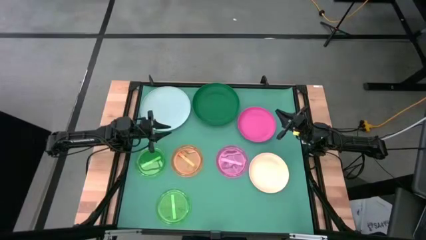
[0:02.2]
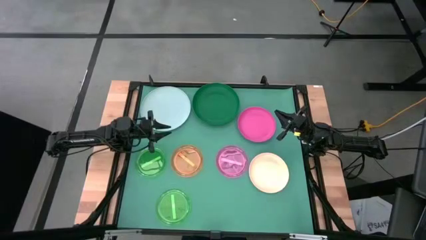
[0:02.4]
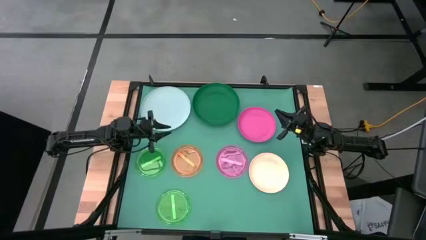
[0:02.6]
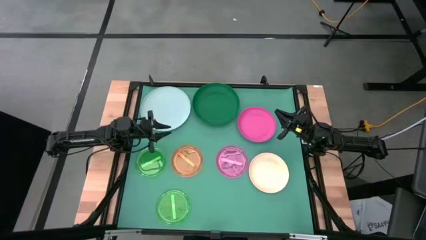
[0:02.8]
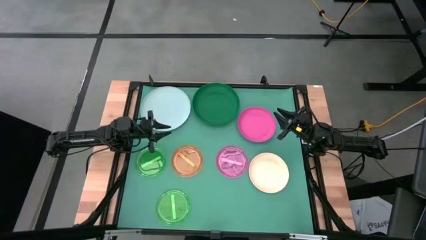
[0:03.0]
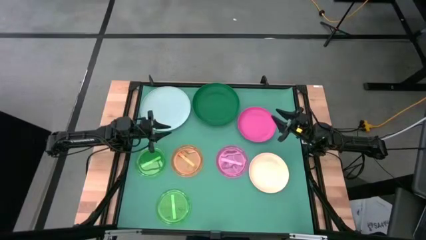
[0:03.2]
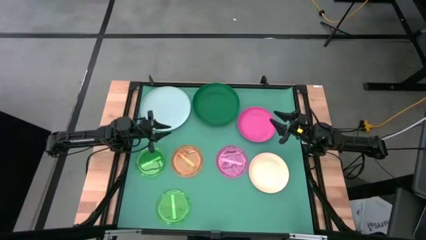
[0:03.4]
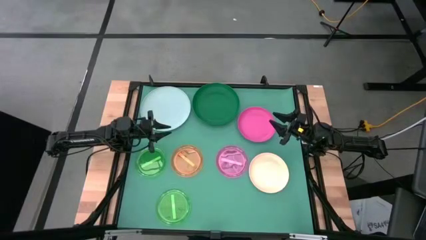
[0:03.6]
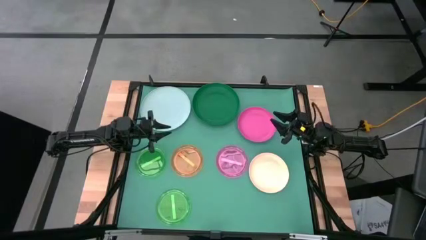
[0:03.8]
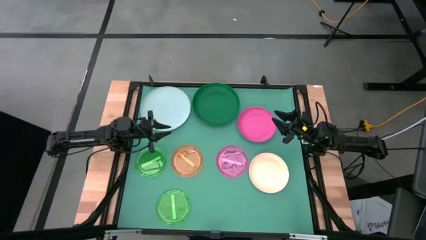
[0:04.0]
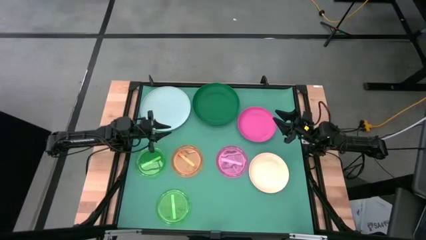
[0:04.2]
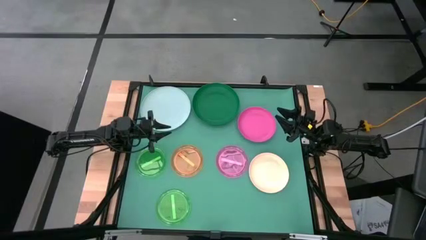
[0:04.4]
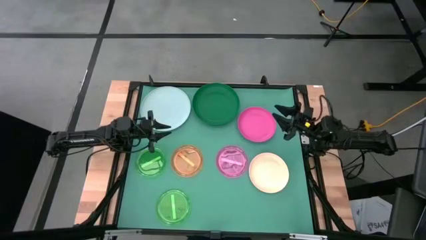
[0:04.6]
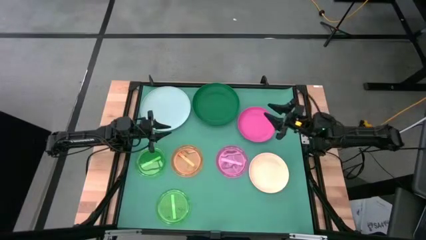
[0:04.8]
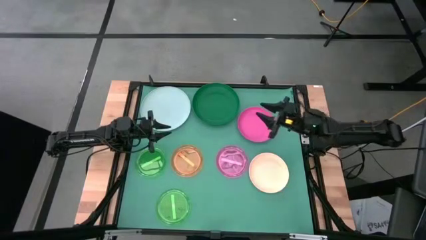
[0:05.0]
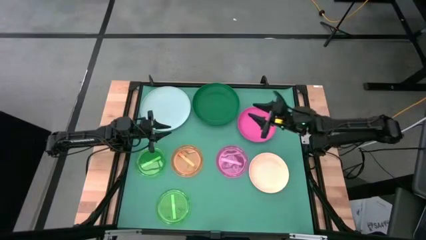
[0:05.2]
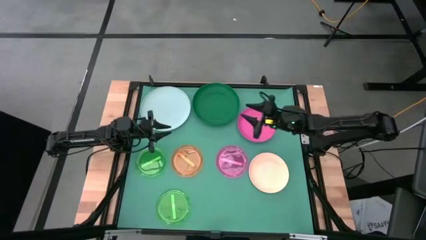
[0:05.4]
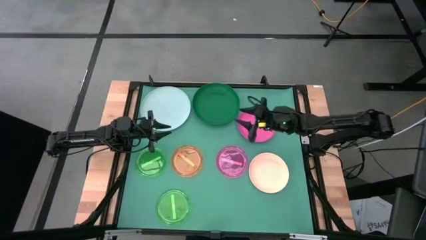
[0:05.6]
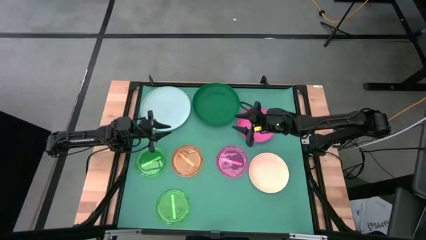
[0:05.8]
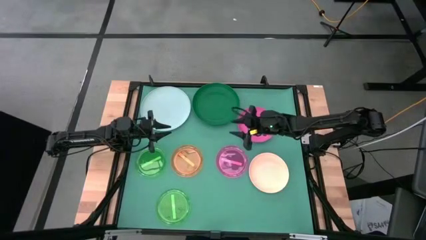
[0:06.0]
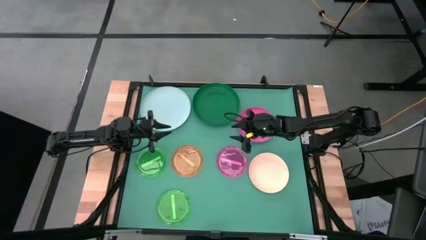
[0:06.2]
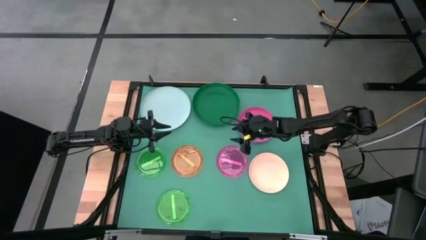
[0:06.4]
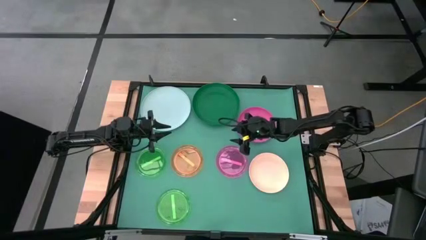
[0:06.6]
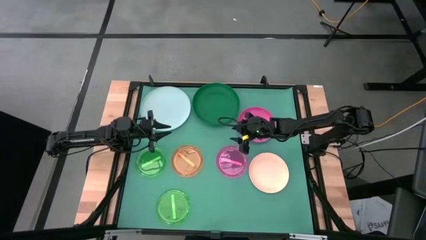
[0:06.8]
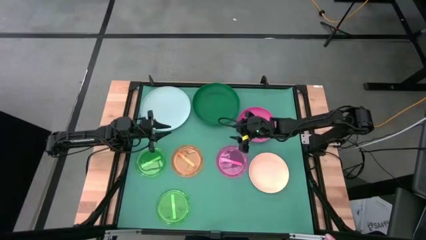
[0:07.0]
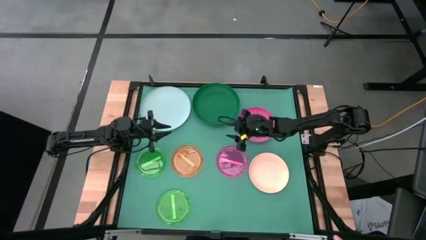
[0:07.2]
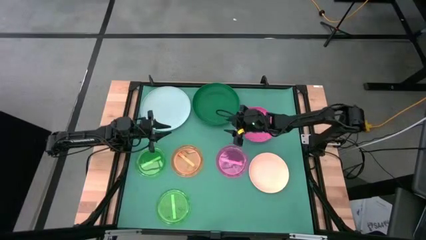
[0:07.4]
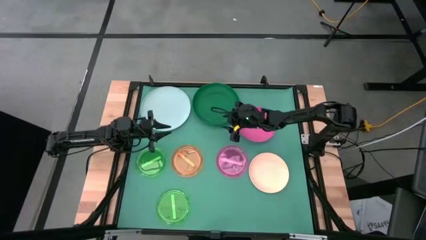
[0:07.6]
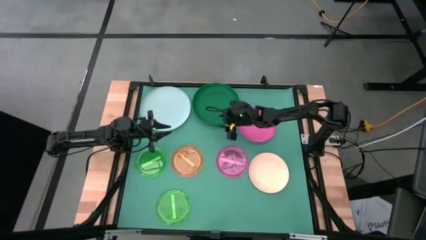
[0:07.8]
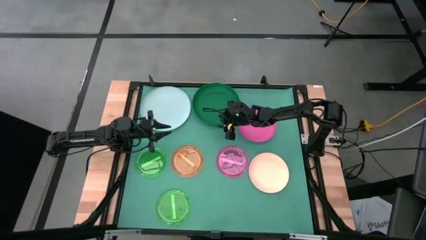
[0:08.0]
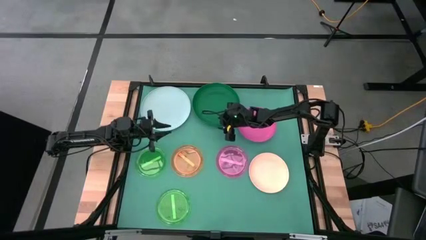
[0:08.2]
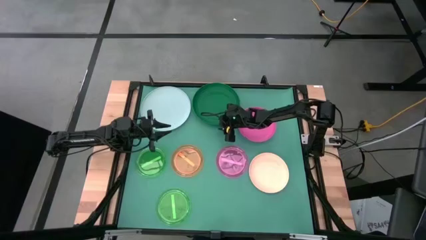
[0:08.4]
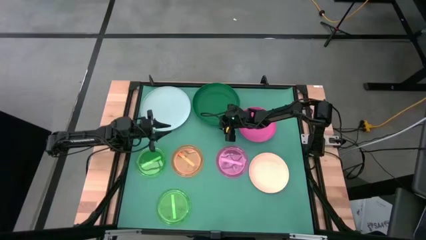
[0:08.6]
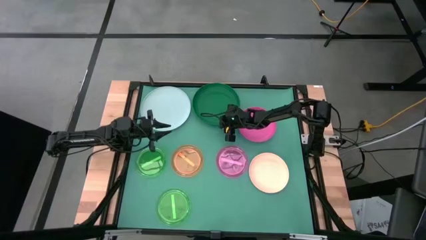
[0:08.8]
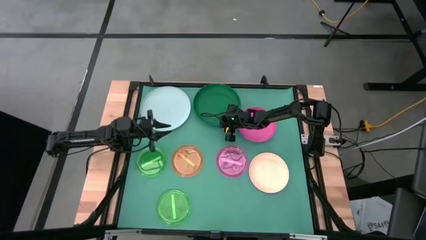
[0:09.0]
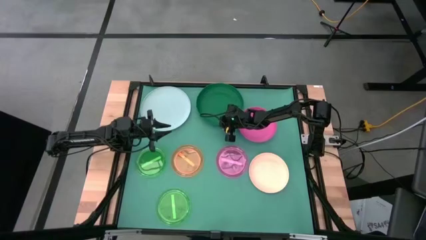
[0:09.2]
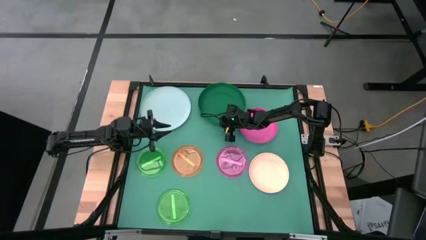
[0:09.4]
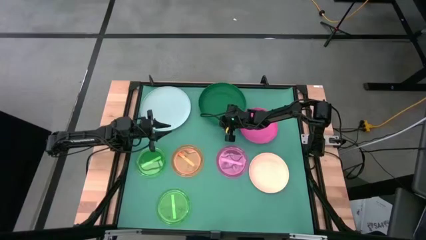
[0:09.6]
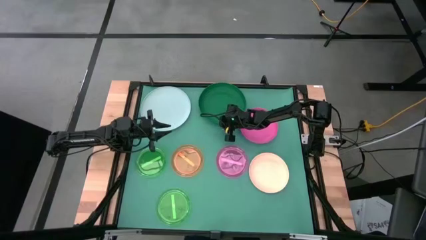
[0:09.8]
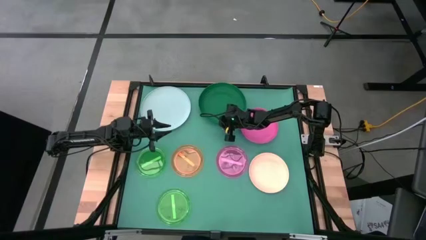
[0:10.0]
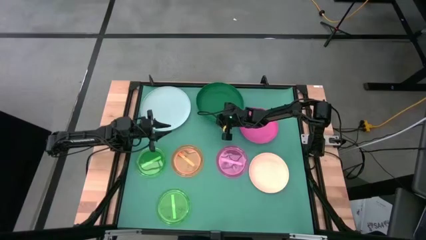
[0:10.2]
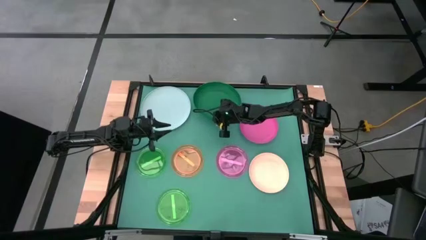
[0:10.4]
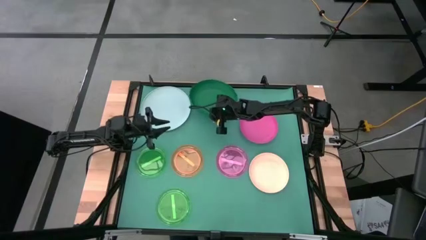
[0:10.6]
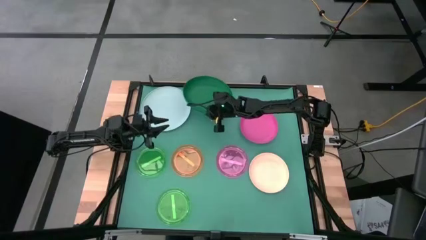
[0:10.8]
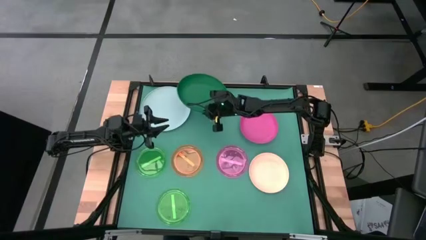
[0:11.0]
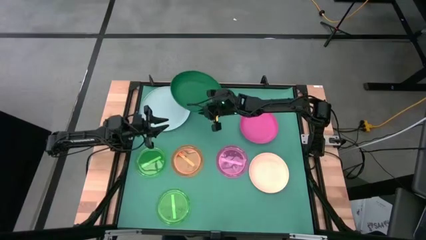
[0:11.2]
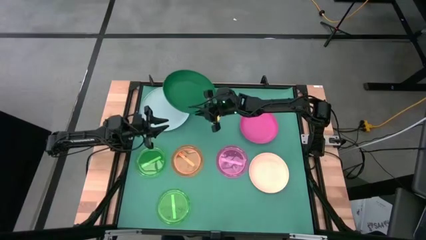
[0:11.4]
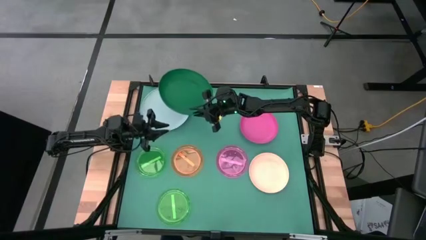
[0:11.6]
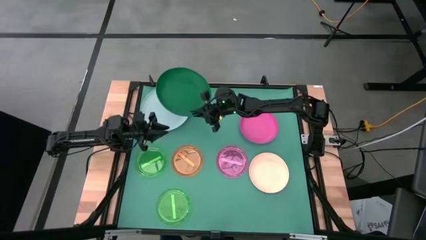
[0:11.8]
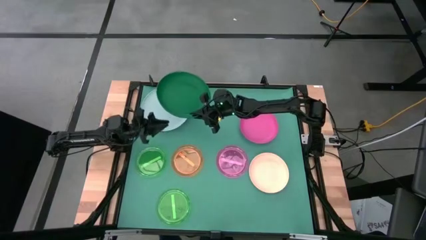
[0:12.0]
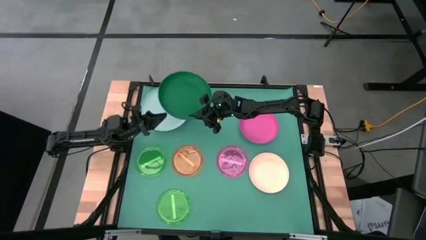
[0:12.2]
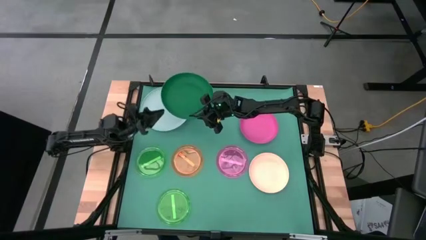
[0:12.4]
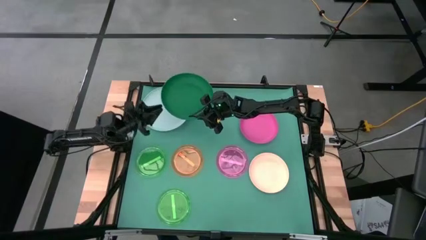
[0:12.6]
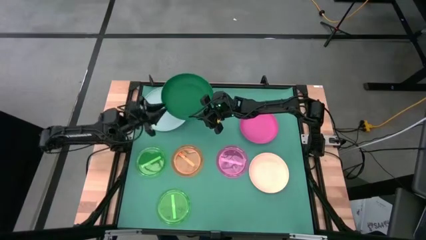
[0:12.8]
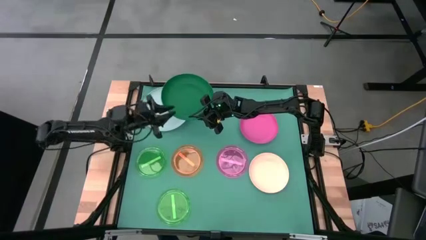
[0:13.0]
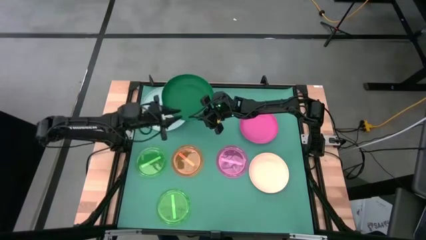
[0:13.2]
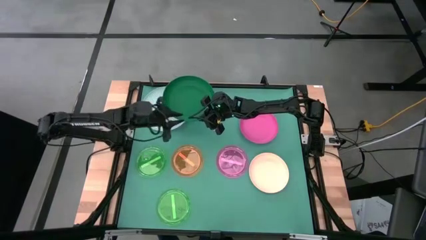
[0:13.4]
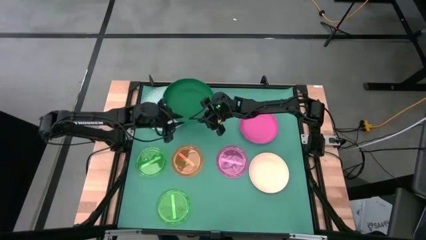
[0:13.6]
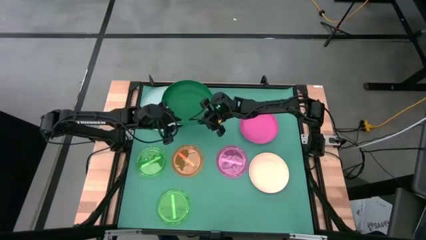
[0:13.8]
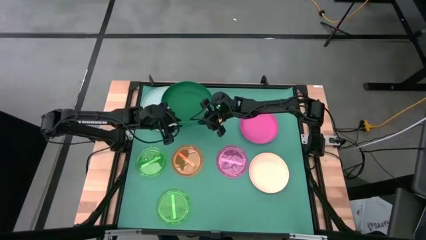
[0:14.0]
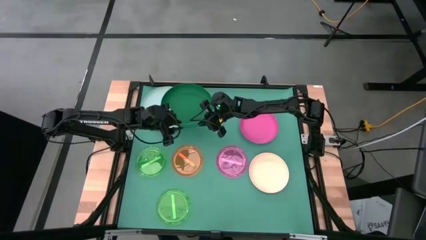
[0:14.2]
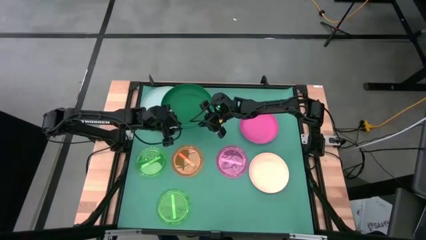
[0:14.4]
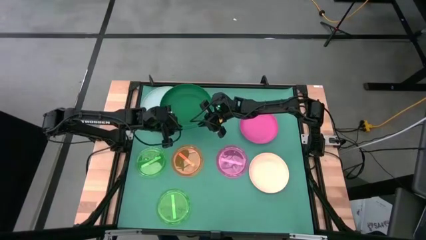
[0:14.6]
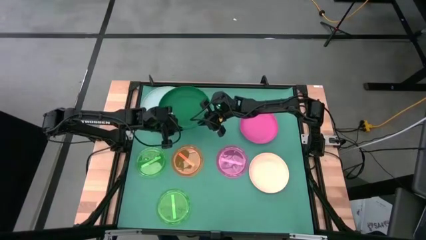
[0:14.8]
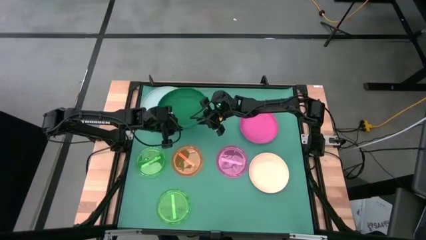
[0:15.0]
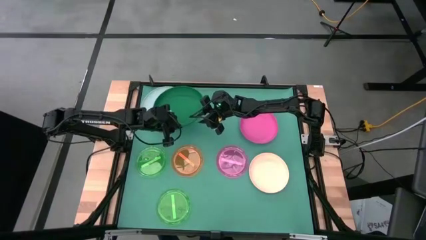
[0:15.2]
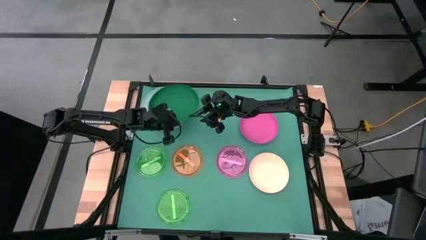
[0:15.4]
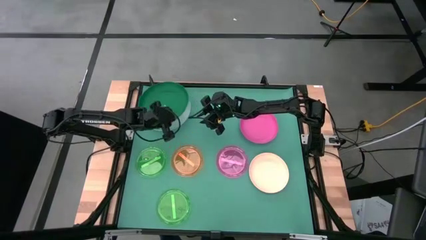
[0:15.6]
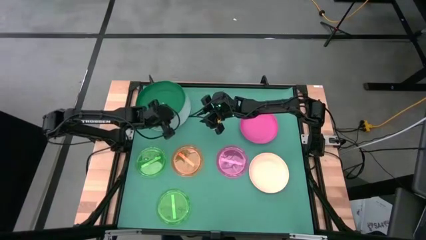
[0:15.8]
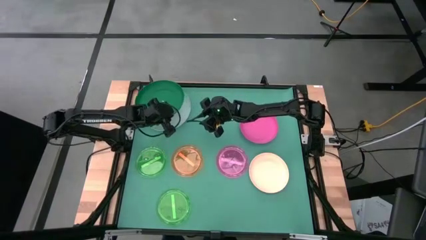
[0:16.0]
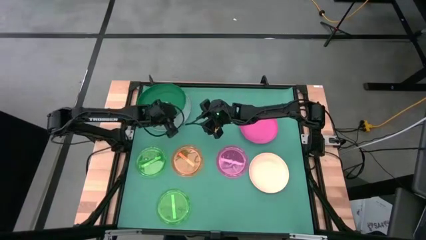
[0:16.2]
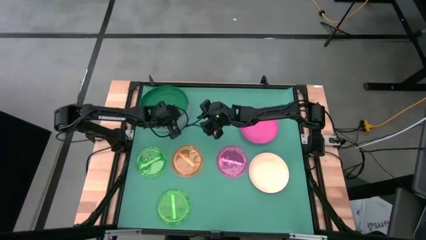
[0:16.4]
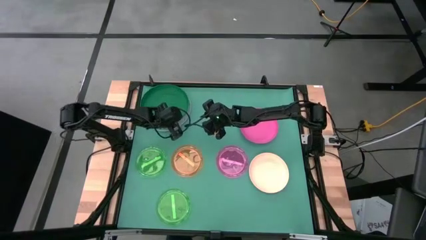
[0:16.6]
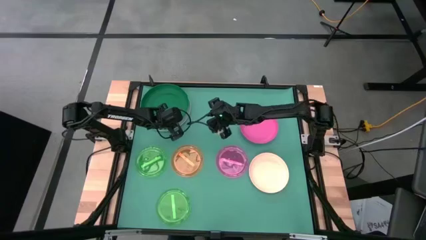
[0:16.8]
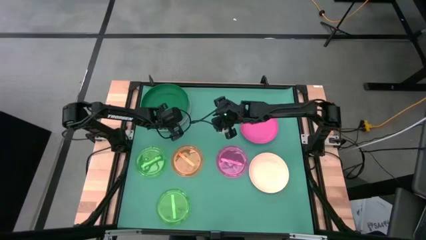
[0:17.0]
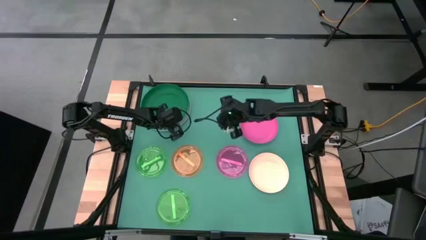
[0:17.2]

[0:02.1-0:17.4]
Task: Stack plastic plates
Stack the dark green plate on top of the blue plate
